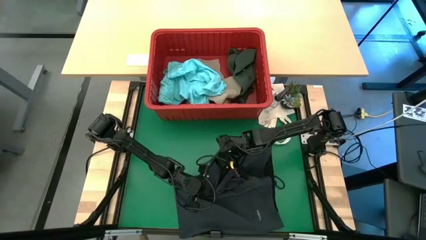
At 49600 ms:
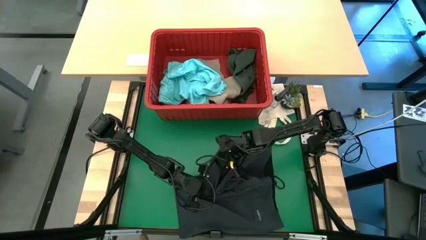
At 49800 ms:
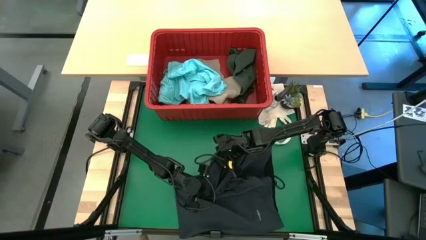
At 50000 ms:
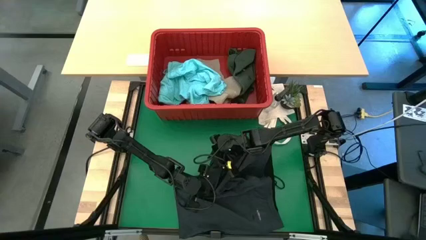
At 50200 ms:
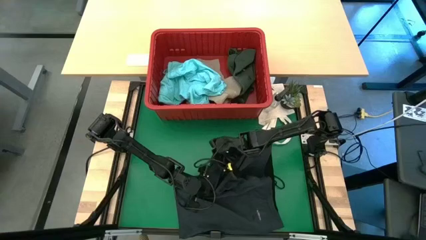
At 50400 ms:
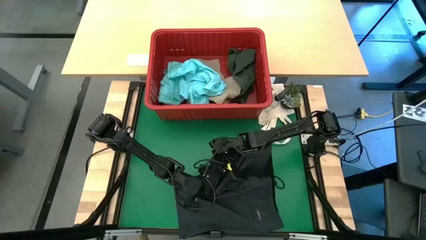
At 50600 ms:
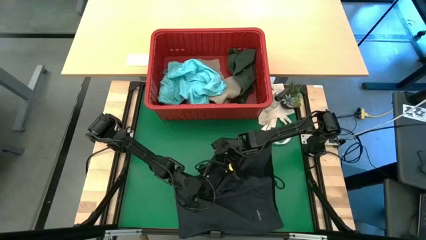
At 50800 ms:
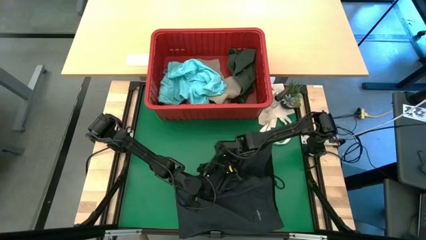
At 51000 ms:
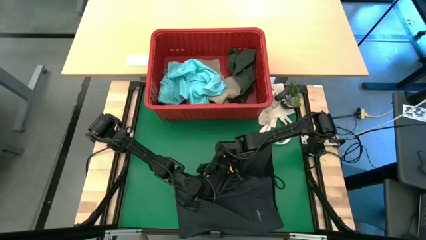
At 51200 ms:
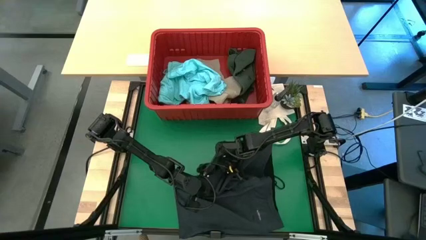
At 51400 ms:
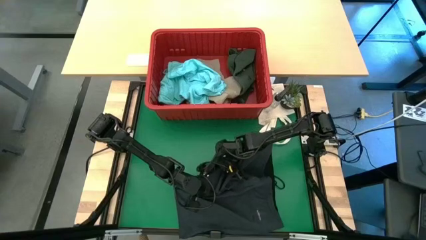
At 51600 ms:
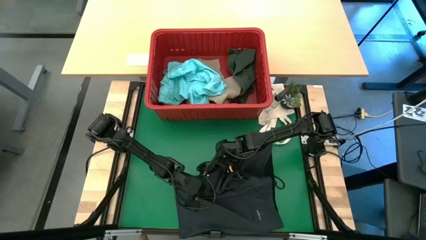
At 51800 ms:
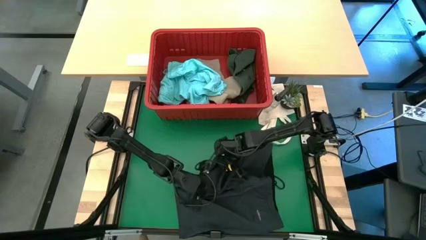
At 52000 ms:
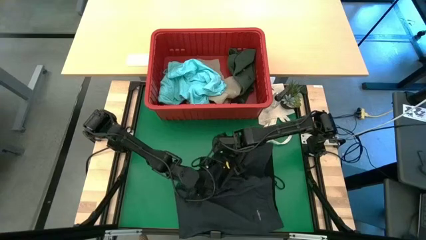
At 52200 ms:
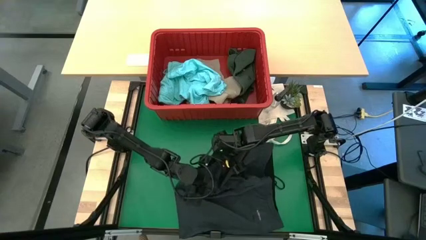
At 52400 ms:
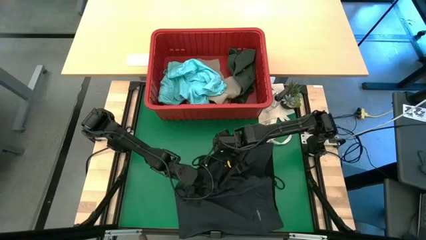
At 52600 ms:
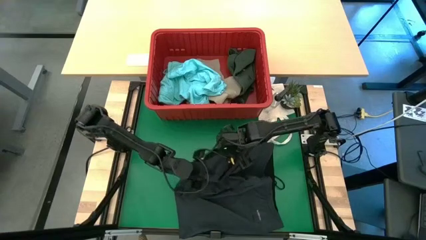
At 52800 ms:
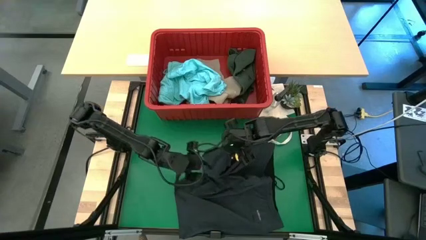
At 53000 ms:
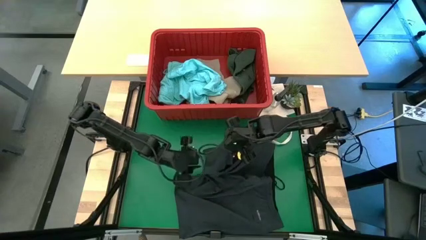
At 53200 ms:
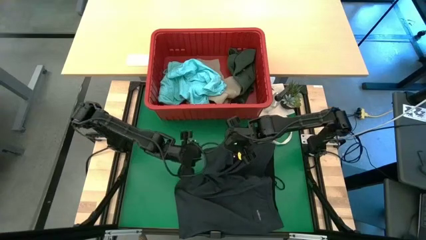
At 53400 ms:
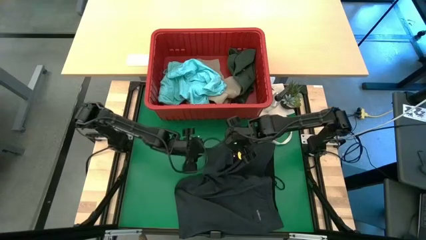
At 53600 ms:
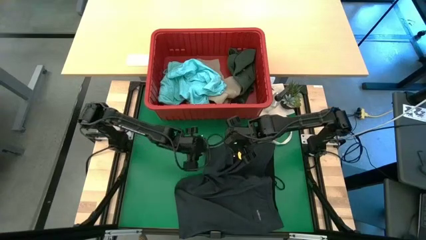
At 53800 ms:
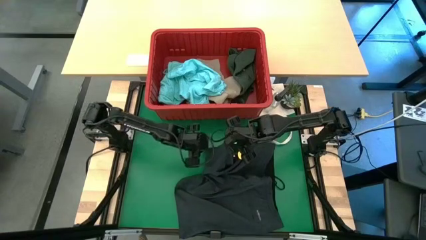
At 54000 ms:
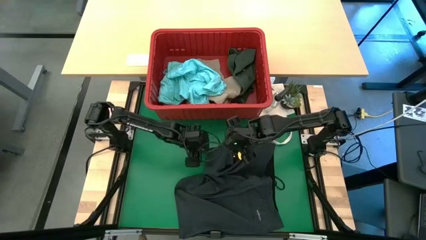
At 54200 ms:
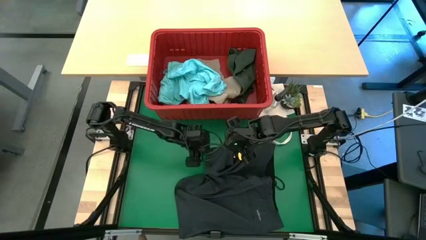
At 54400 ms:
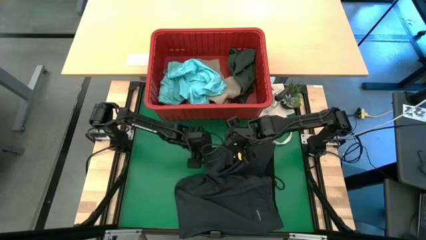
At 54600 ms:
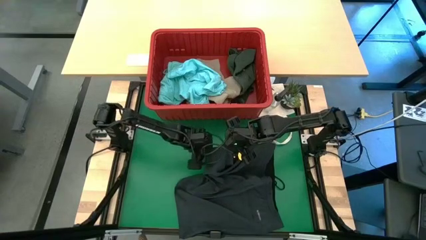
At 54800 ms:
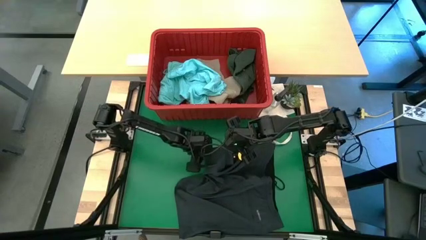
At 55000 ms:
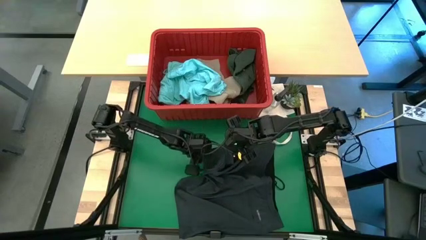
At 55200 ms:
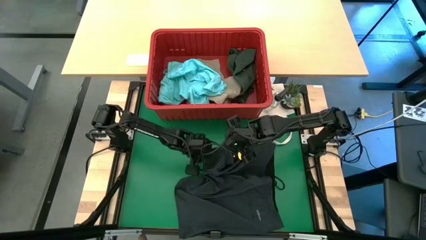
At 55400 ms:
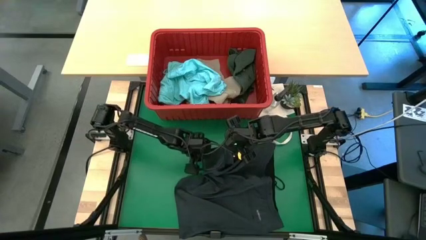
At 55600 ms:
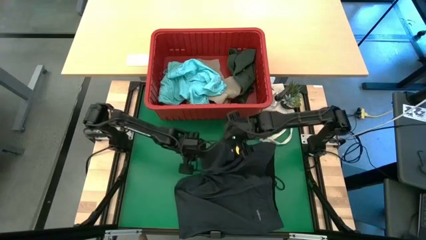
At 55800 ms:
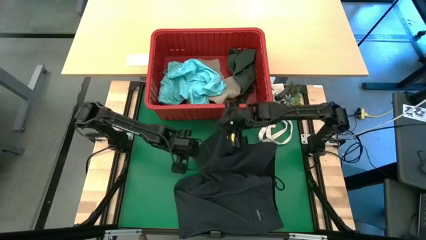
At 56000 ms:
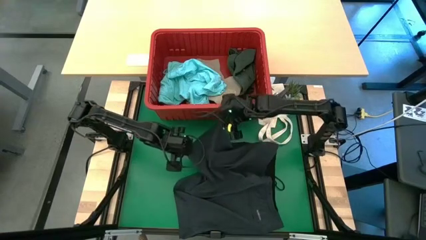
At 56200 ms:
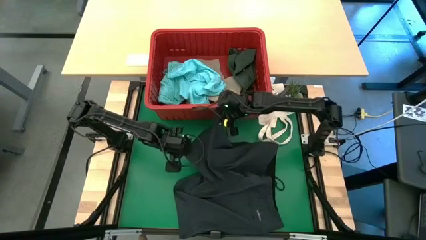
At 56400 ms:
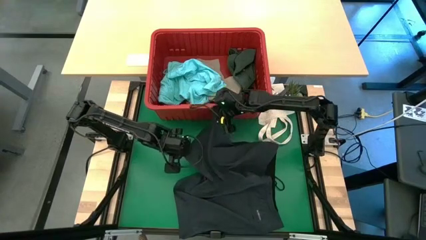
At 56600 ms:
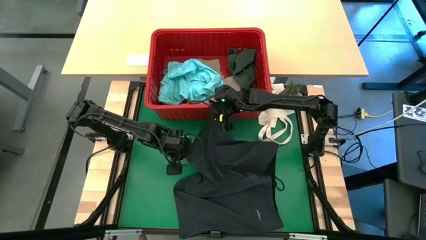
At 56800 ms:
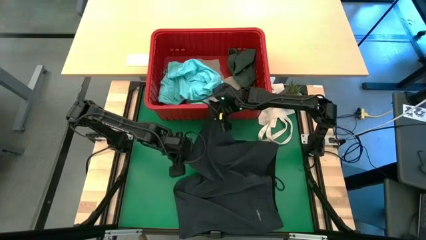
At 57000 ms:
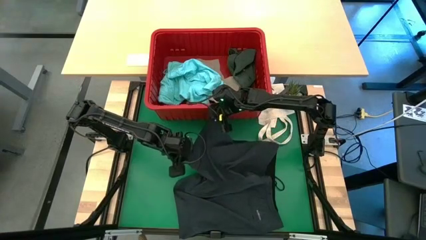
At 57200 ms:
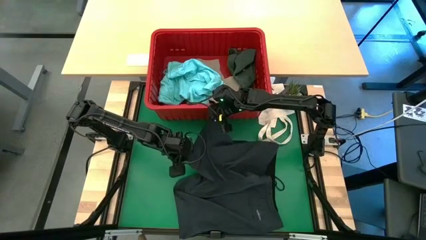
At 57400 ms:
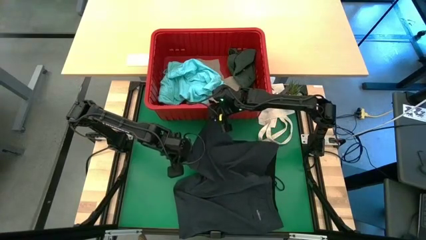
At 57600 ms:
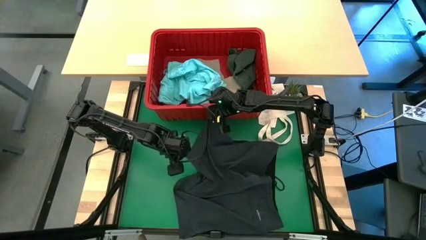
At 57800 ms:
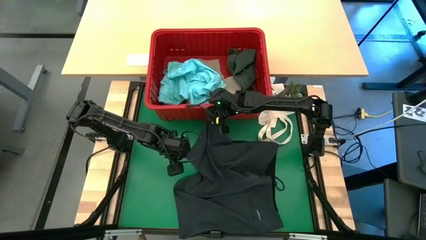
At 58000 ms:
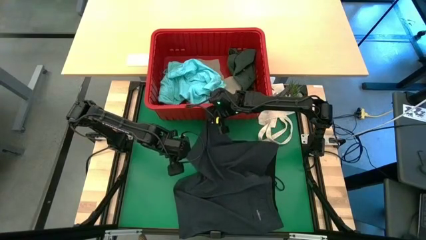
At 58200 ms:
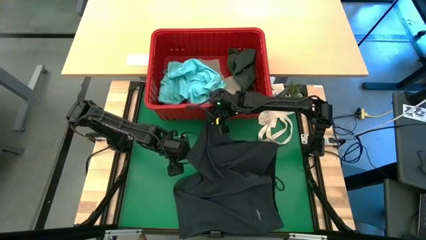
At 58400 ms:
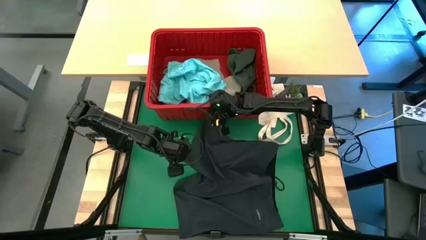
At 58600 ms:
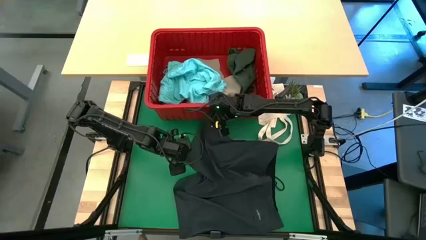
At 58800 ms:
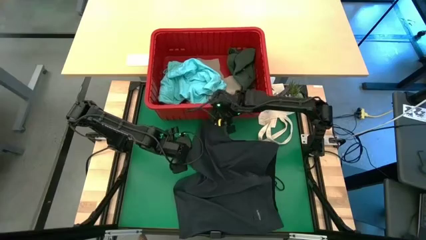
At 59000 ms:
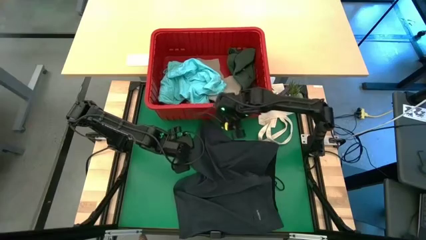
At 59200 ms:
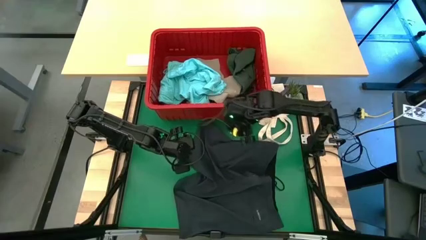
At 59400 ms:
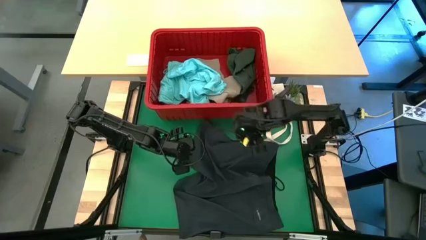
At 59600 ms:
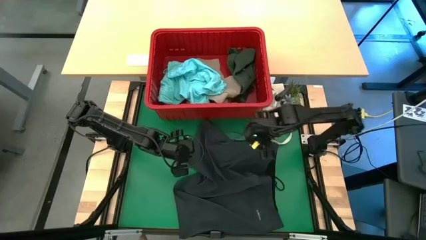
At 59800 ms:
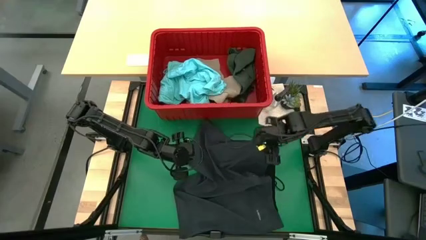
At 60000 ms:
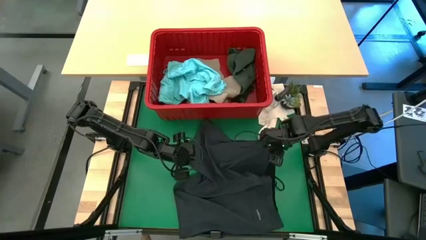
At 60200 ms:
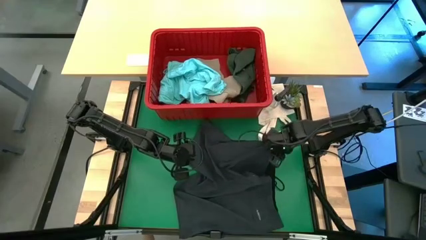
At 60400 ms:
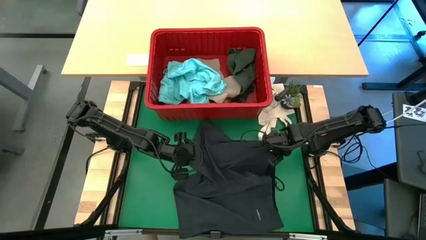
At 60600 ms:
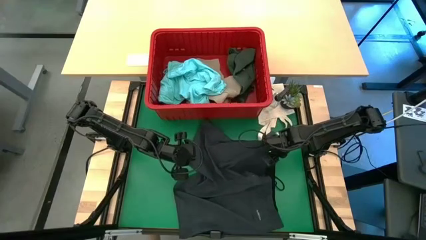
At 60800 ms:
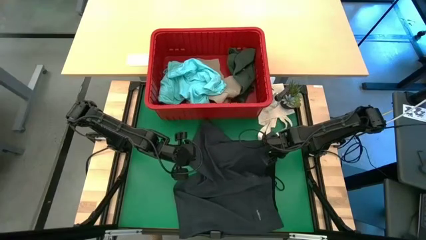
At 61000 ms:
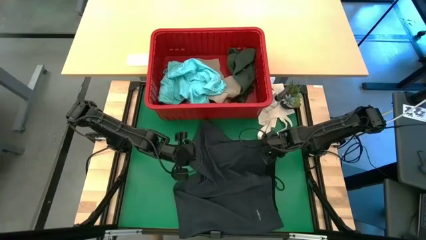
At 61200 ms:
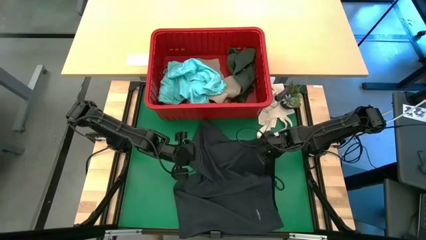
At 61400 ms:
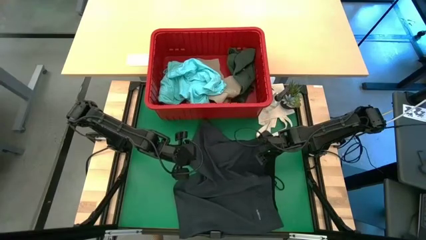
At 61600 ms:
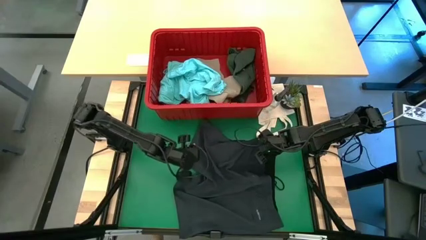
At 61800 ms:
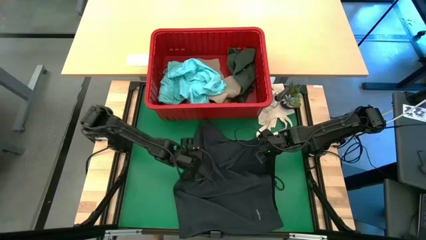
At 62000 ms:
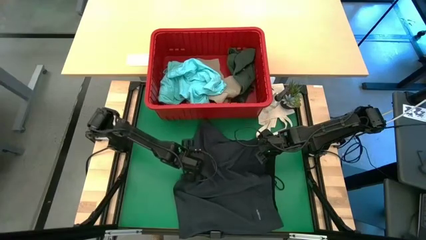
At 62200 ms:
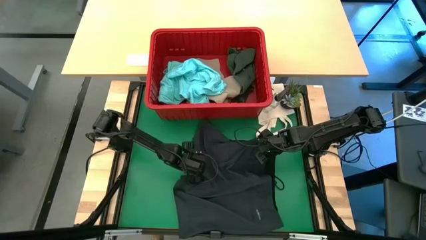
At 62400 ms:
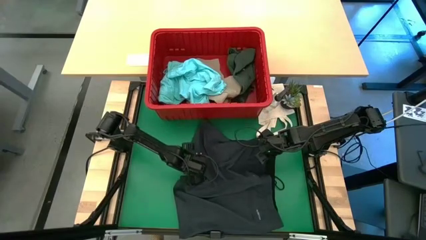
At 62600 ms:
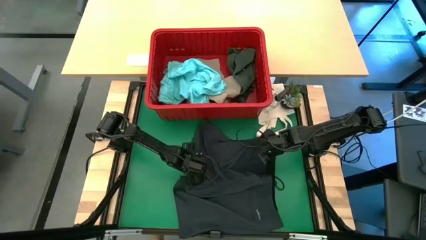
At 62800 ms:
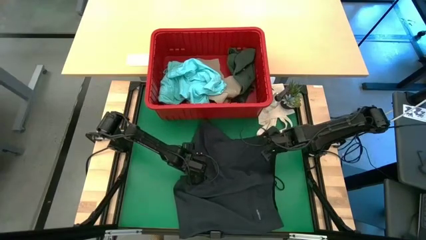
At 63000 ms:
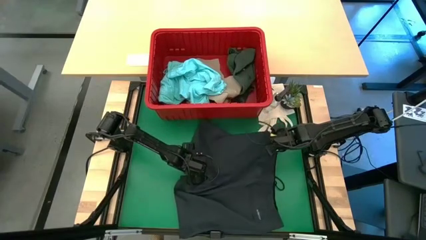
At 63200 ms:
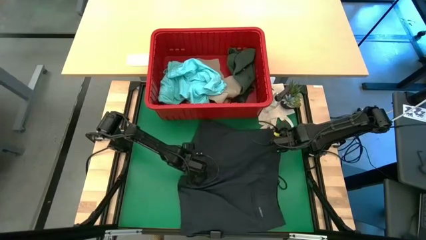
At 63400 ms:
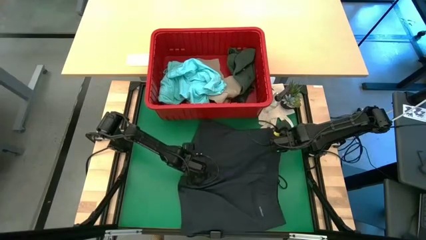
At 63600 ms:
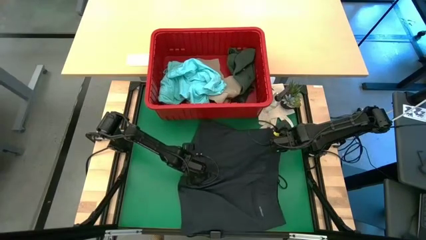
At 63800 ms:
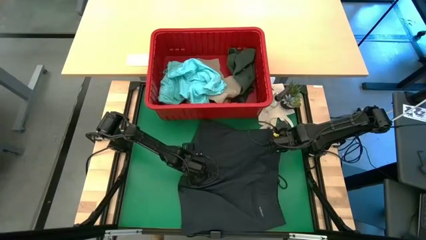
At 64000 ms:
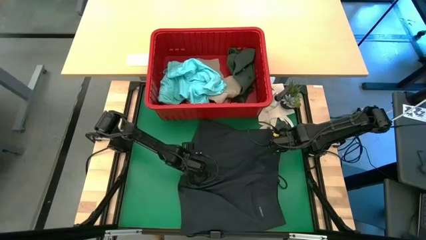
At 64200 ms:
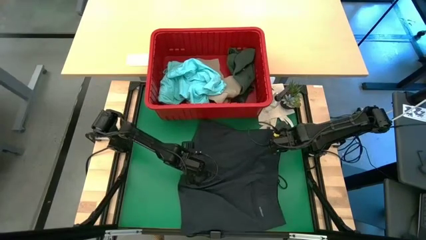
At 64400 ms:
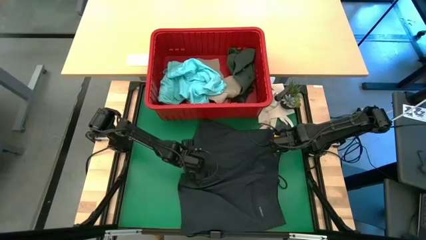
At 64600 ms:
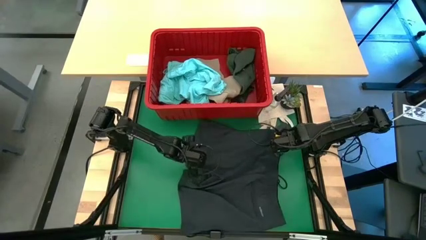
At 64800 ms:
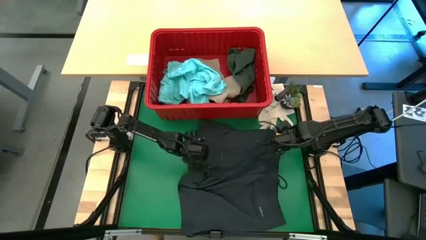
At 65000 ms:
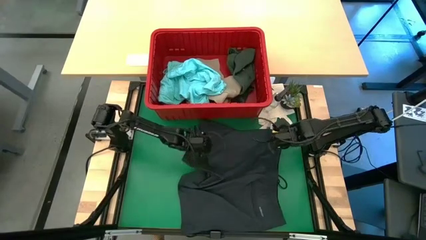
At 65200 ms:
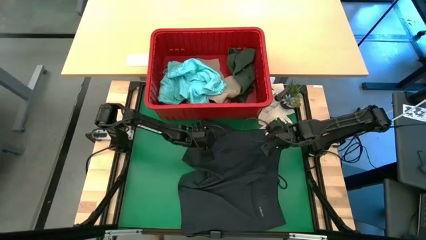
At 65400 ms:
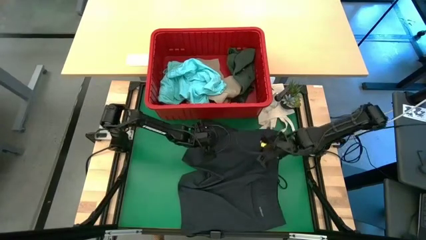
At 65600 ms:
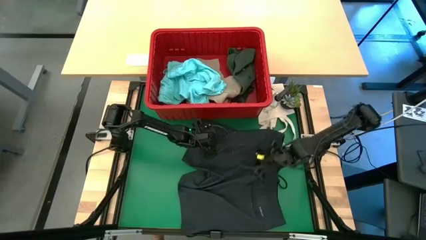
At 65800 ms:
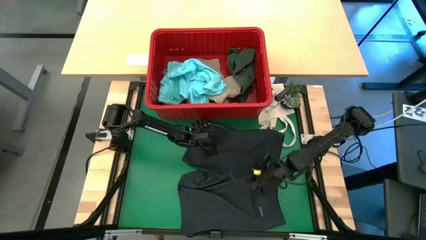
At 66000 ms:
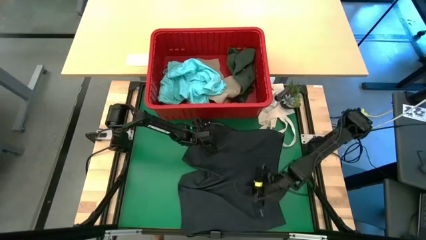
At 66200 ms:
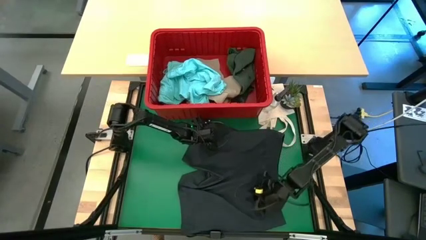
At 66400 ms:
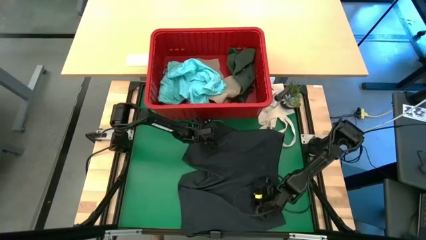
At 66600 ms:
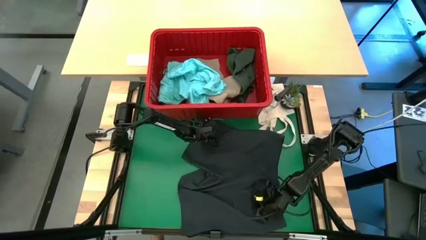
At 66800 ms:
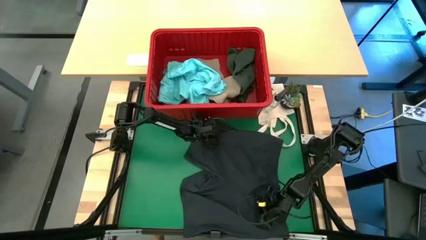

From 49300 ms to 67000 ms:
Task: Fold Laundry from Bin
Fold the black shorts from the red laundry bin
